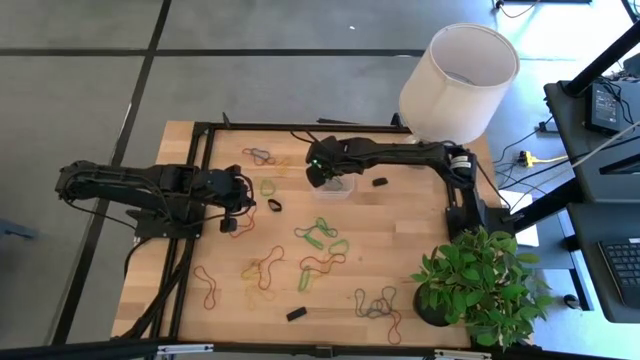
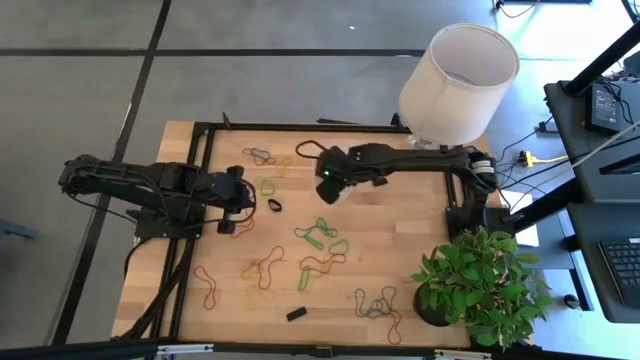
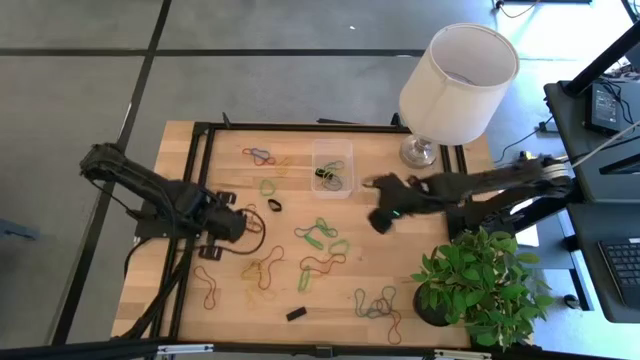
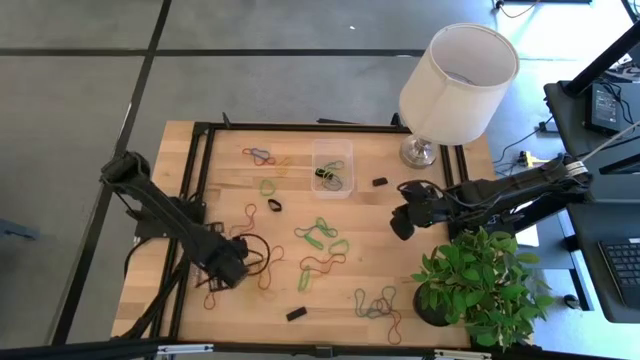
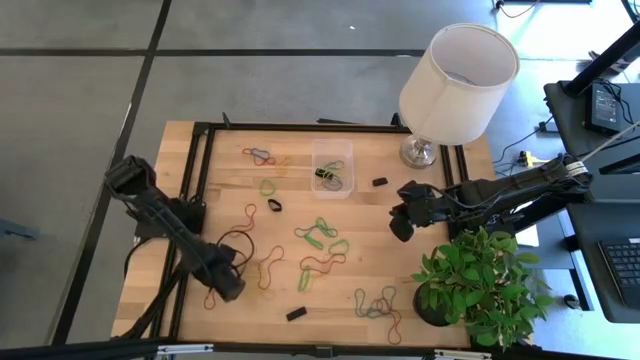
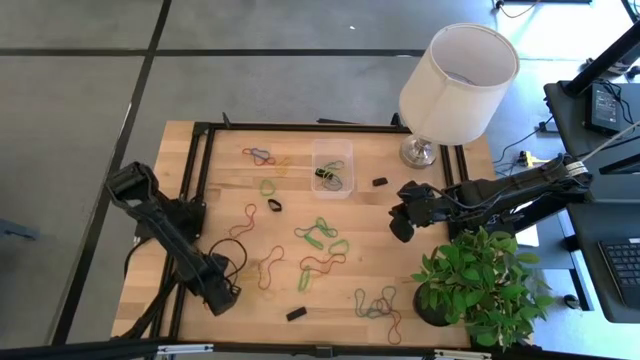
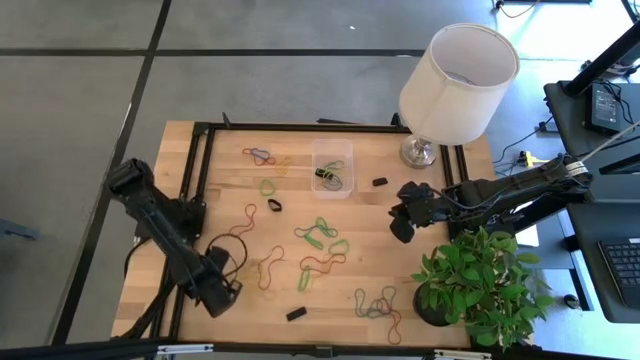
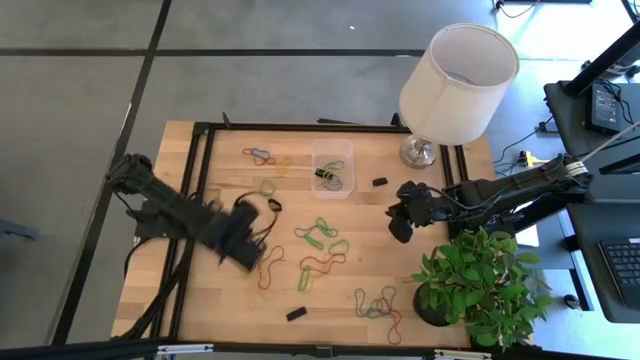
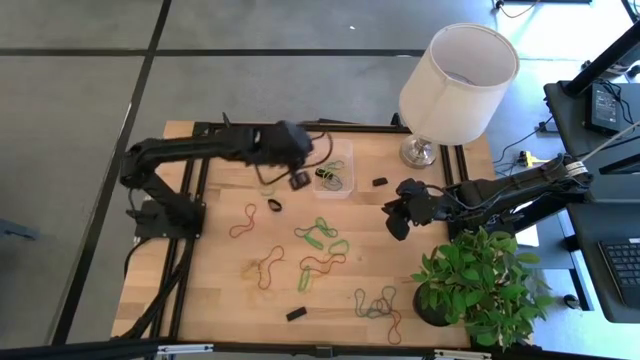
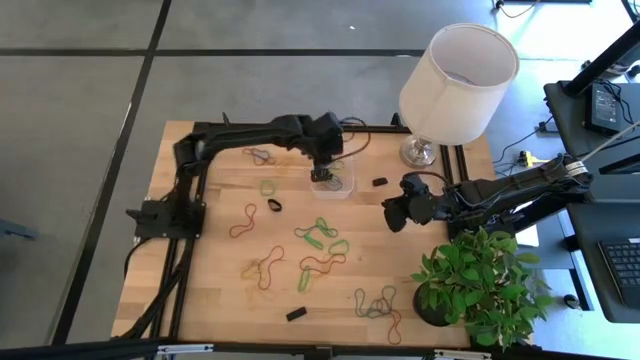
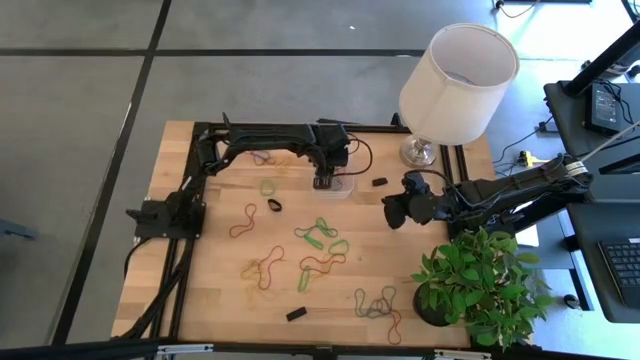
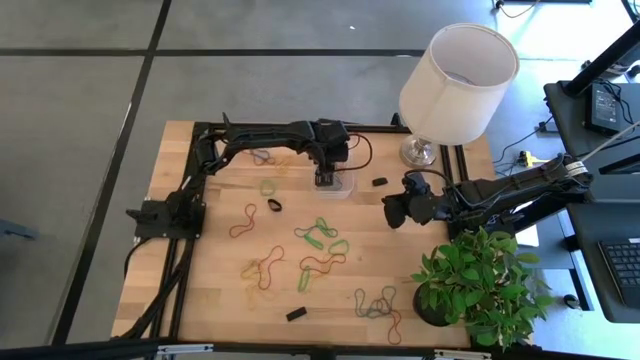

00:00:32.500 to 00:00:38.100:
Task: Pick and place rubber bands into bin
Put the red rubber band into the transparent bin

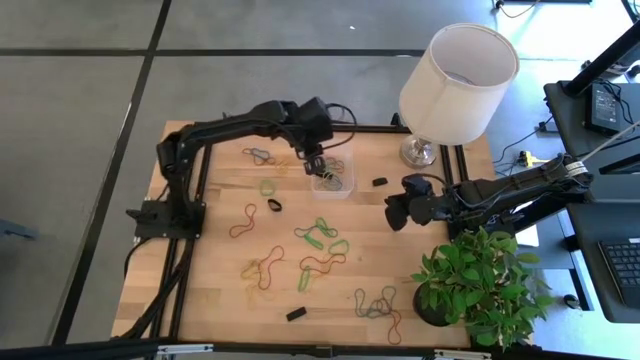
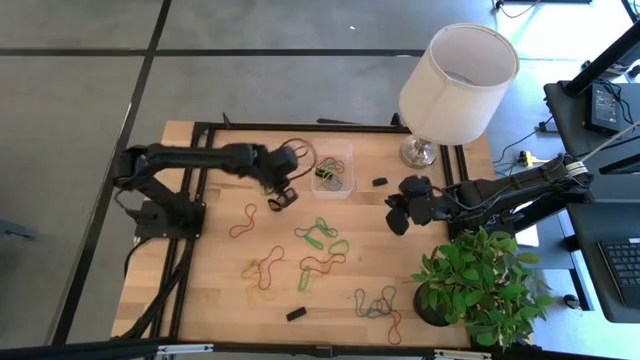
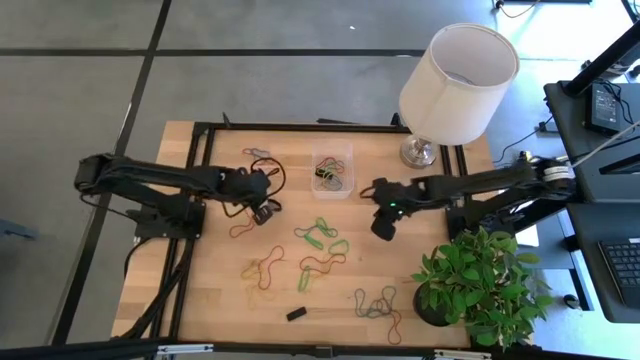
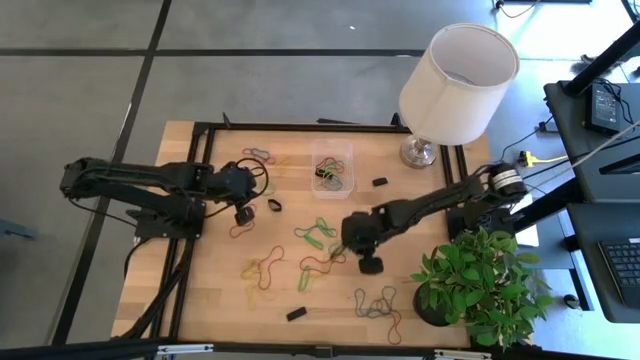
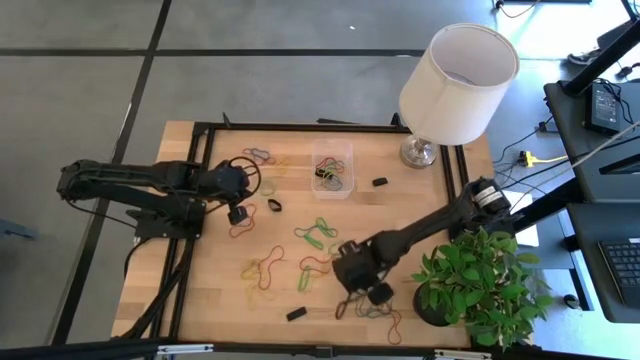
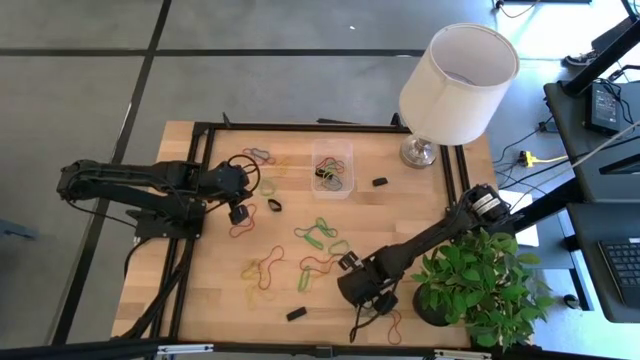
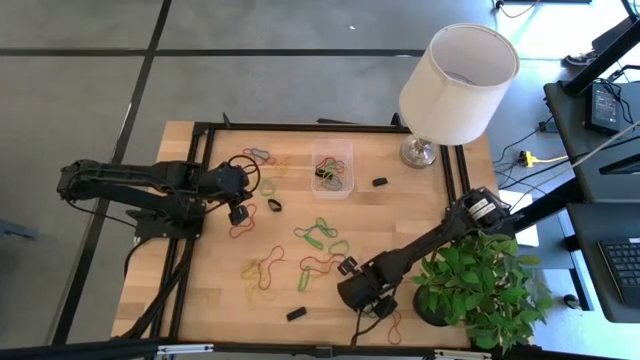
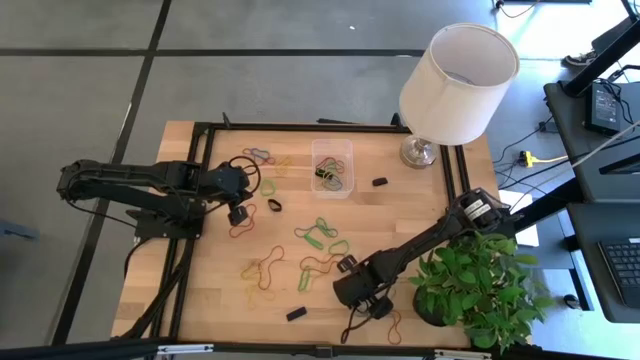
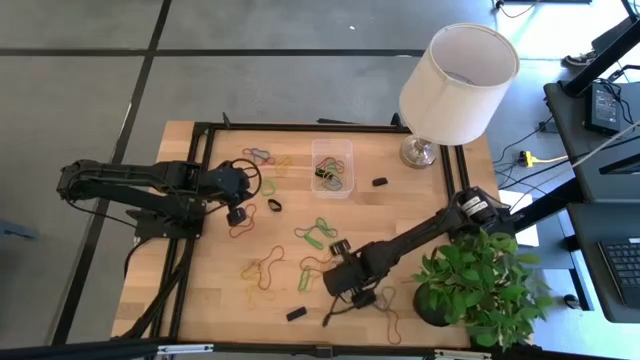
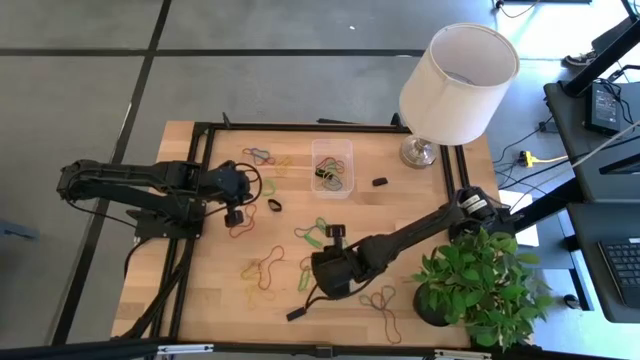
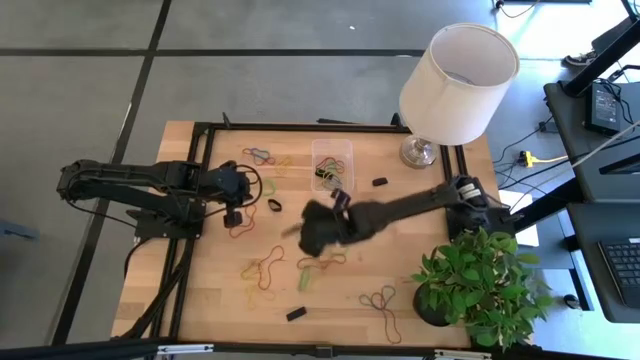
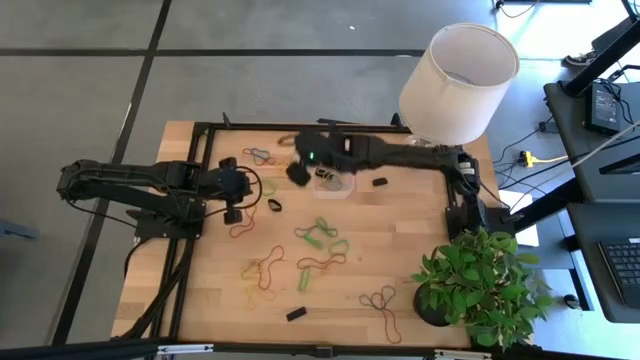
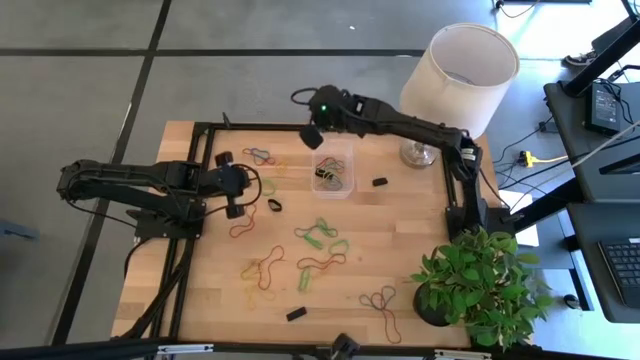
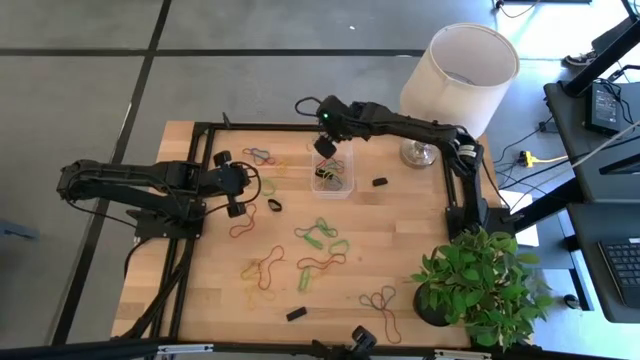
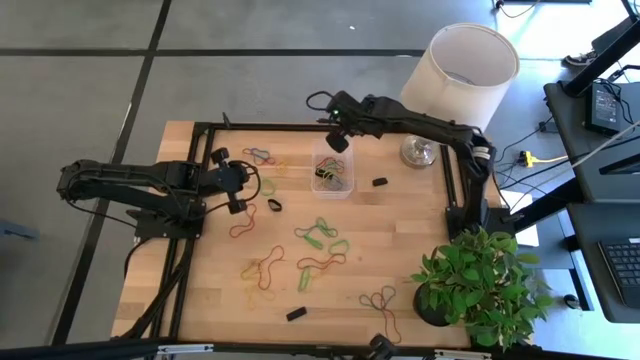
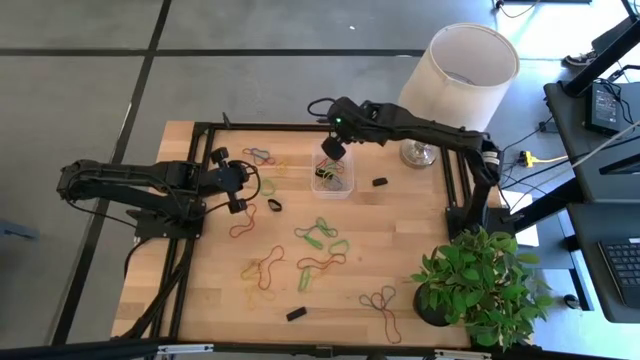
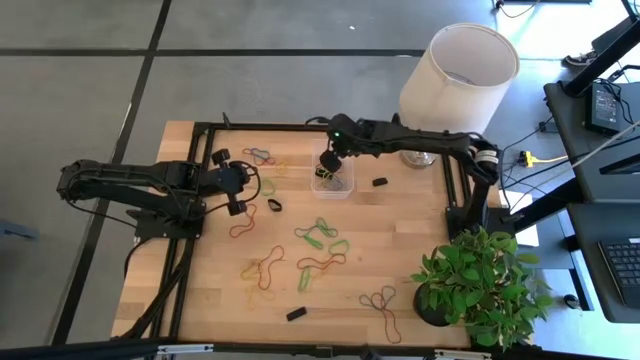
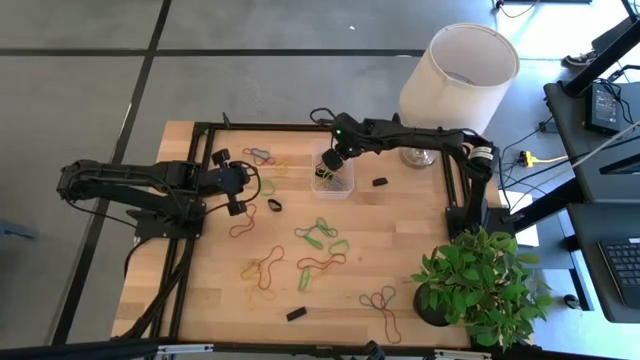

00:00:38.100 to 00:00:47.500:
Put the blue rubber band into the transparent bin

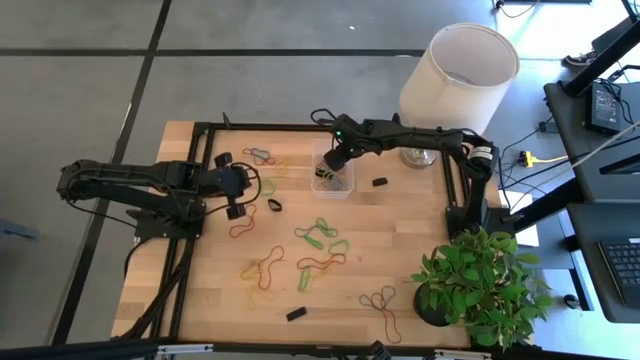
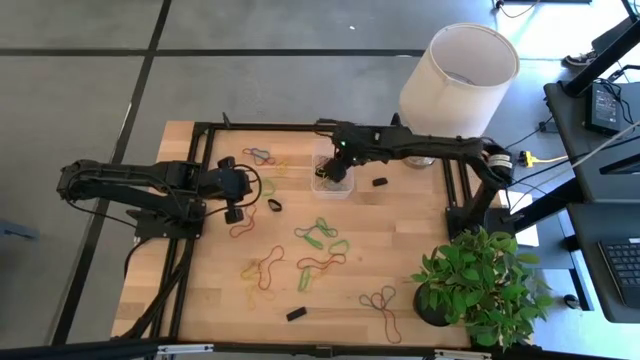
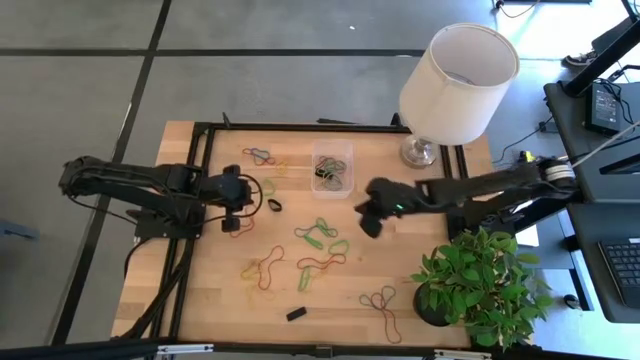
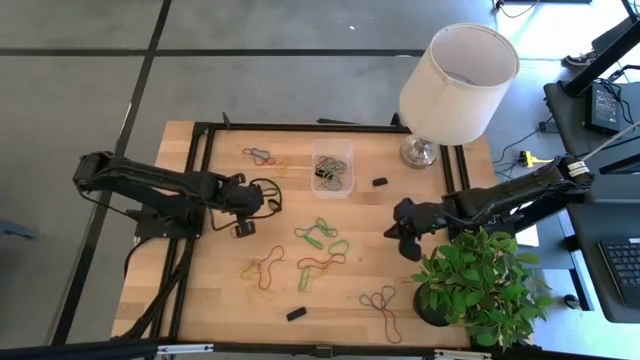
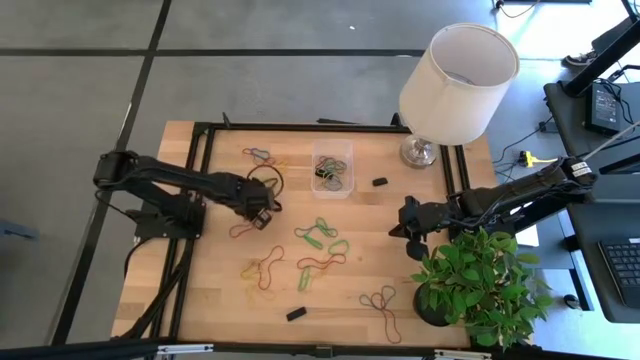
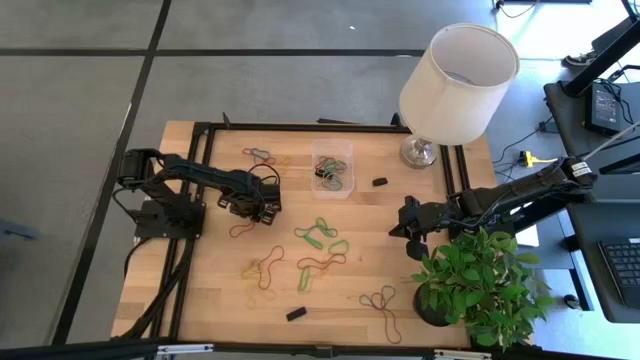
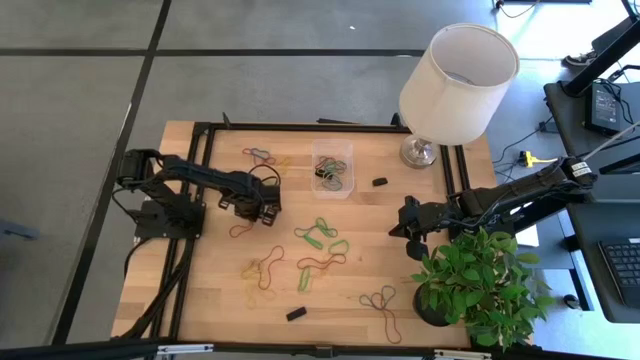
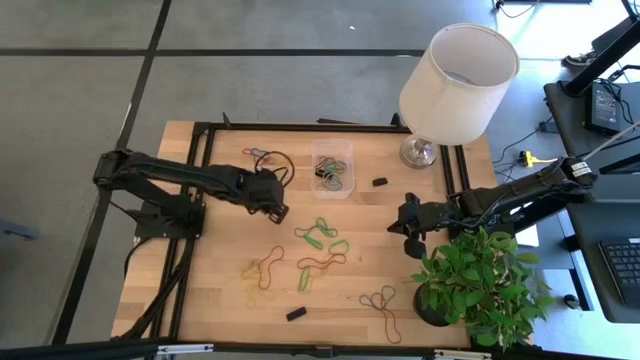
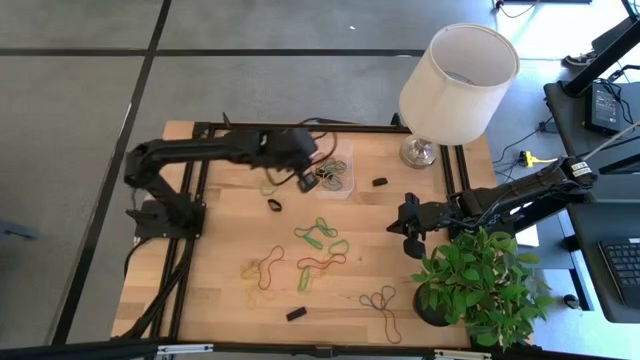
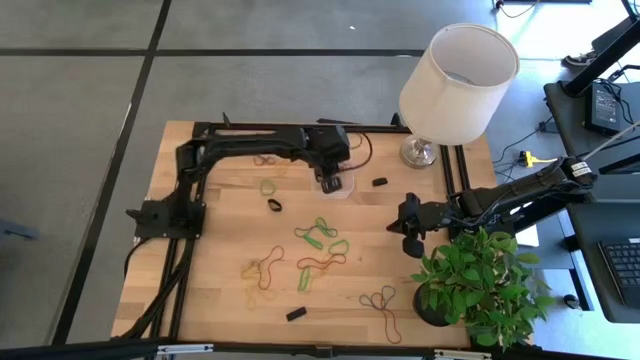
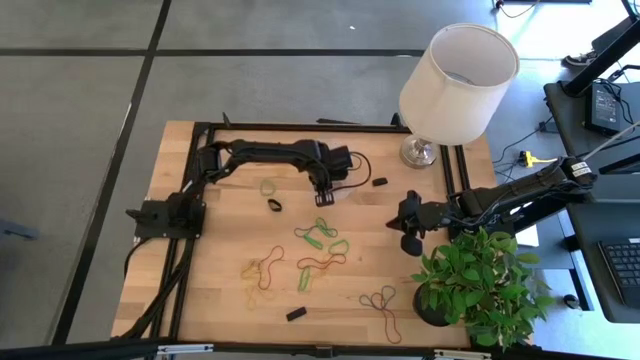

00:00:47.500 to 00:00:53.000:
Put the red rubber band into the transparent bin

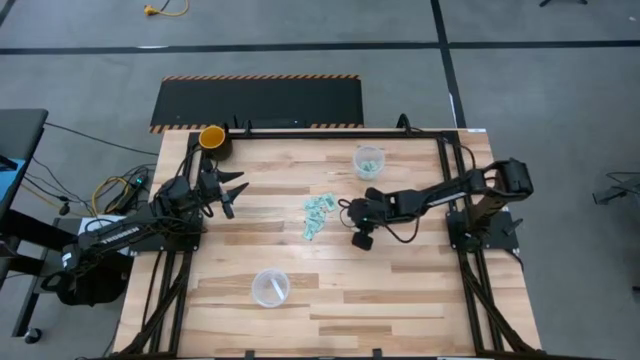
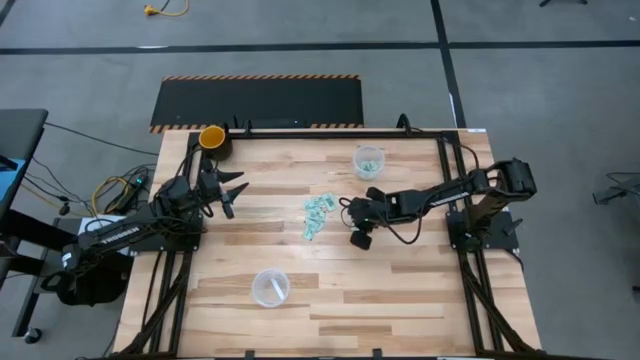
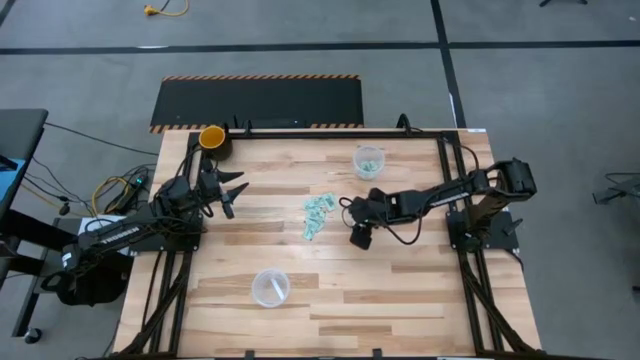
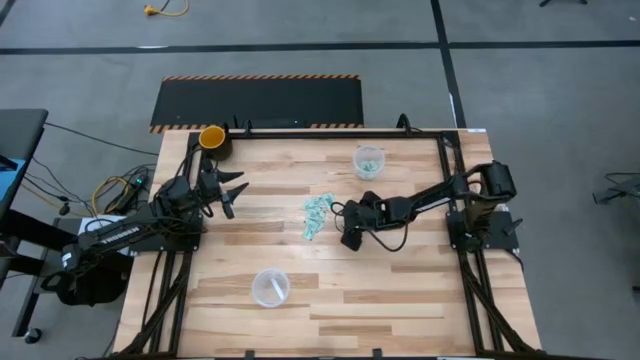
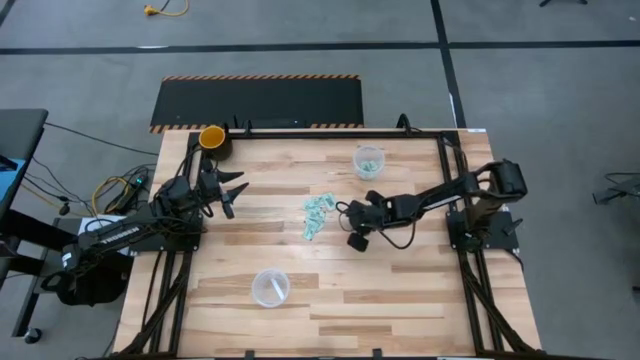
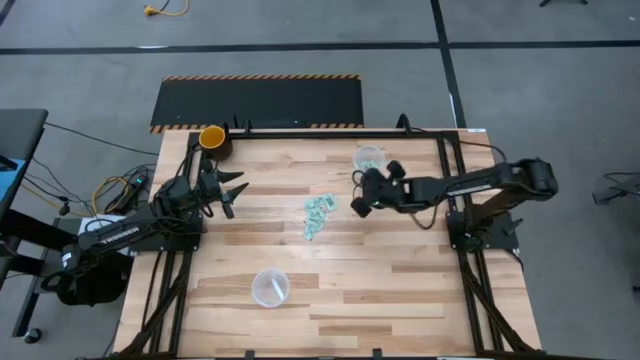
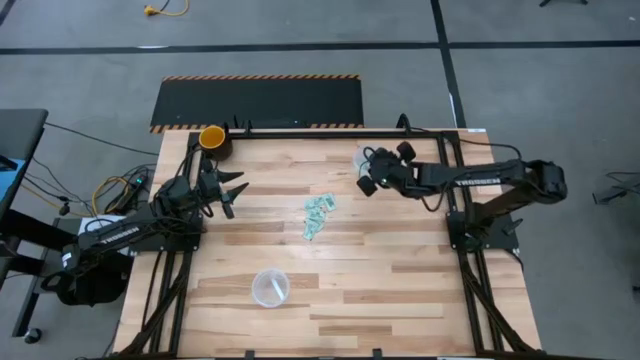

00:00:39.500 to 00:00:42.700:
Task: Pick and place Stevia / Truvia into bins
Put the stevia packet into the top container
